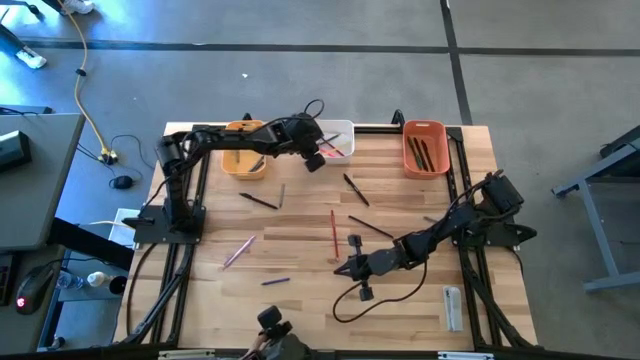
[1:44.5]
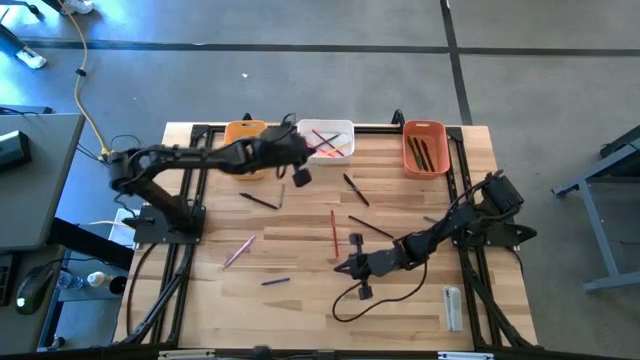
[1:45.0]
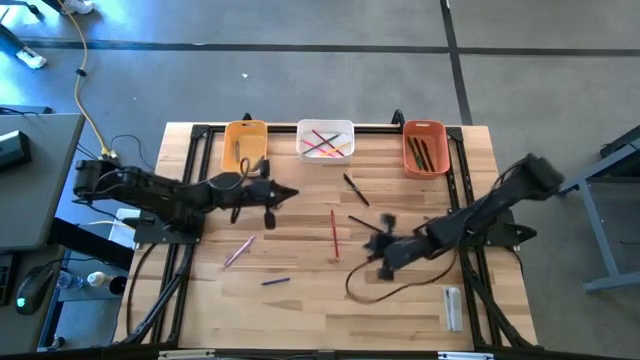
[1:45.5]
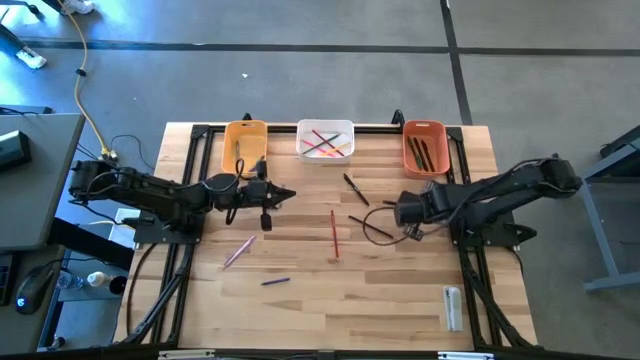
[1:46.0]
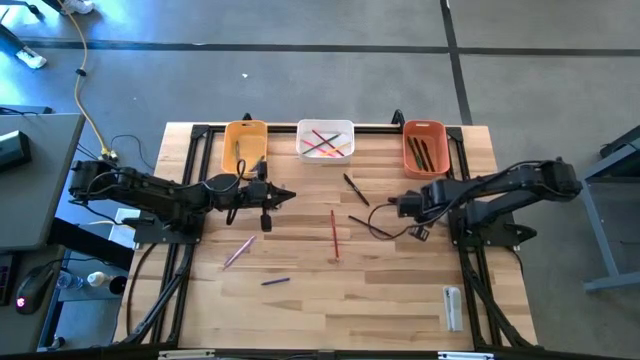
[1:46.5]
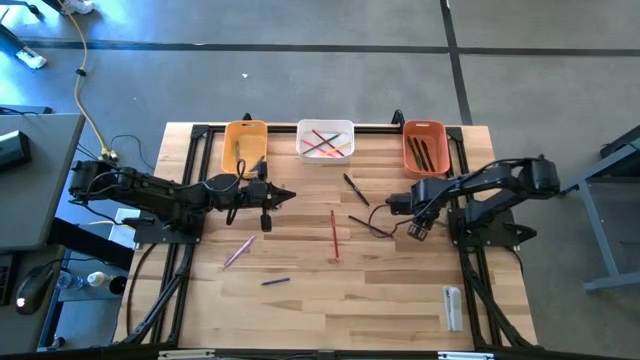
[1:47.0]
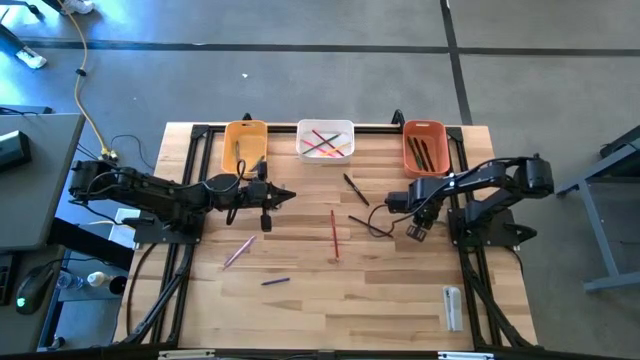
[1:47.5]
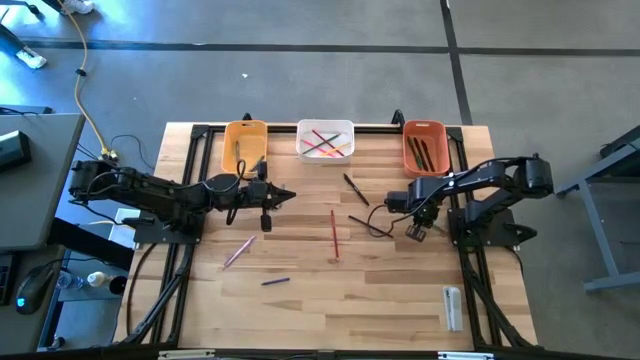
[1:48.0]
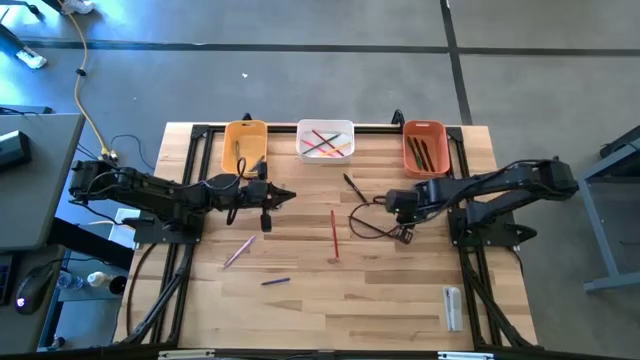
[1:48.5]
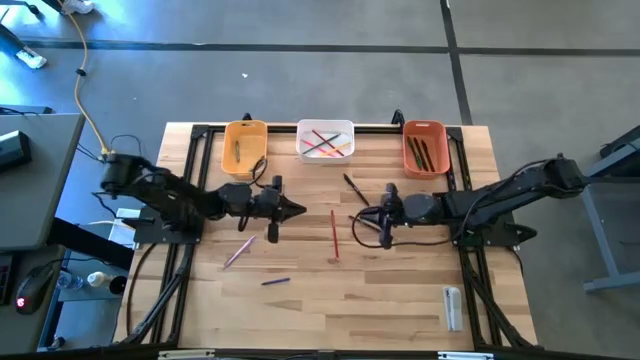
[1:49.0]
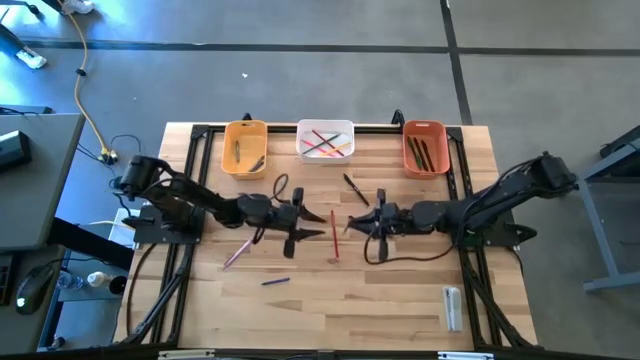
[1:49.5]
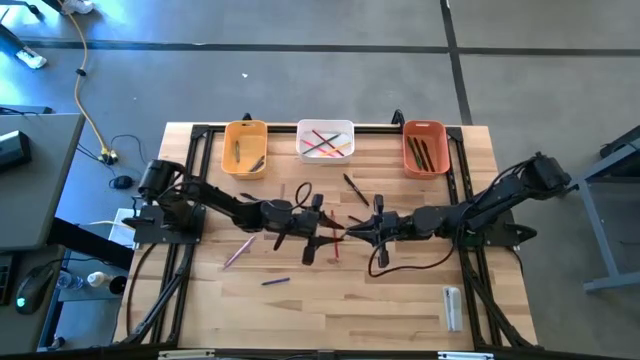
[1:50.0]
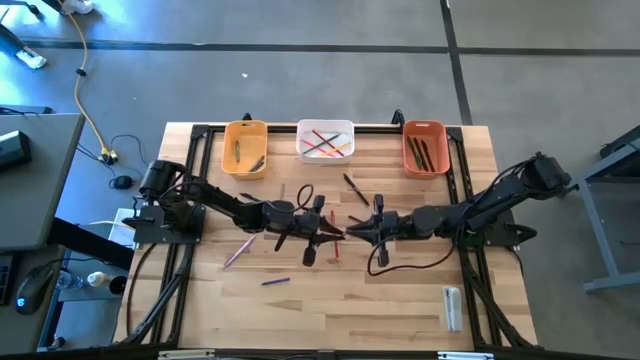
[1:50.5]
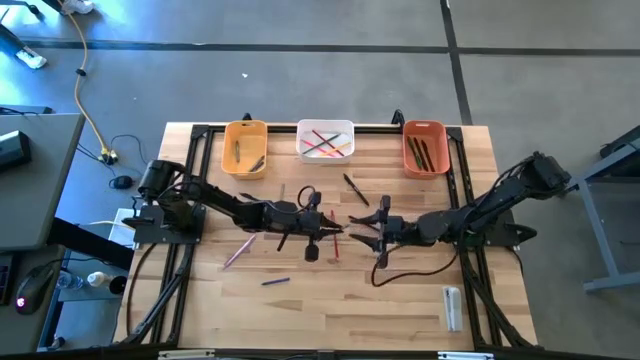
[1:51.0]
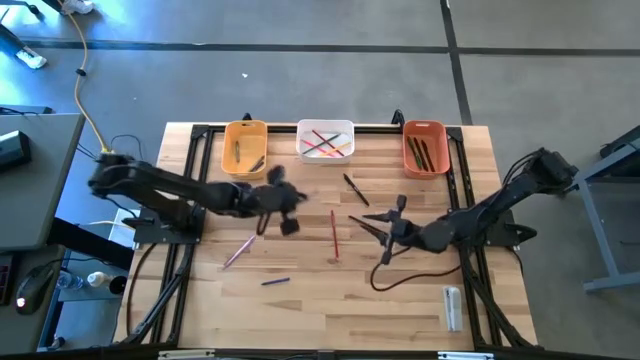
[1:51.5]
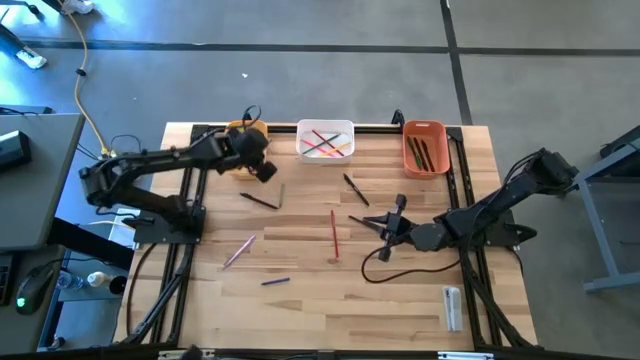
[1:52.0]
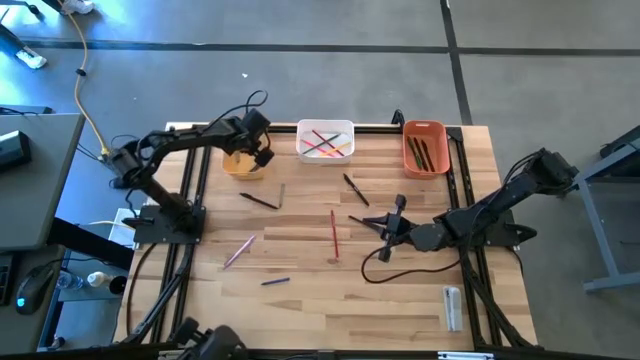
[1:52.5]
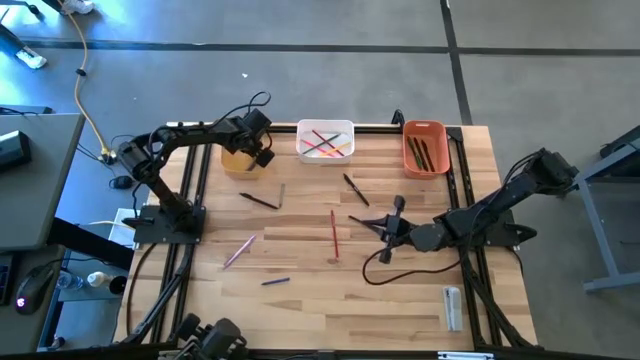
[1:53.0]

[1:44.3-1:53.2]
Task: Sort crayons/erasers/pens/pencils in bins
Put the gray crayon into the yellow bin

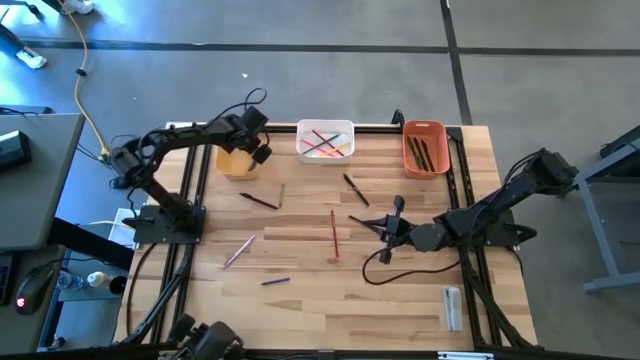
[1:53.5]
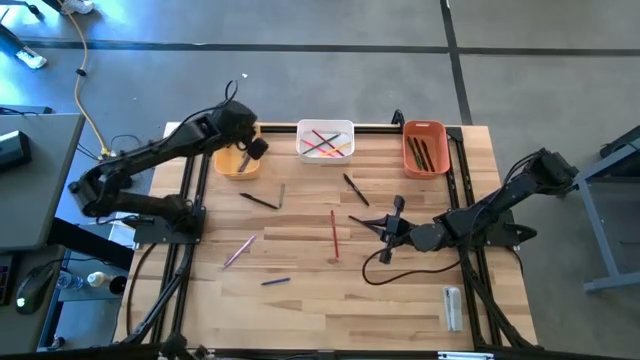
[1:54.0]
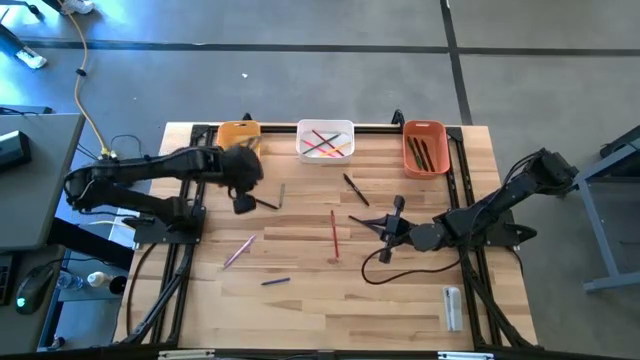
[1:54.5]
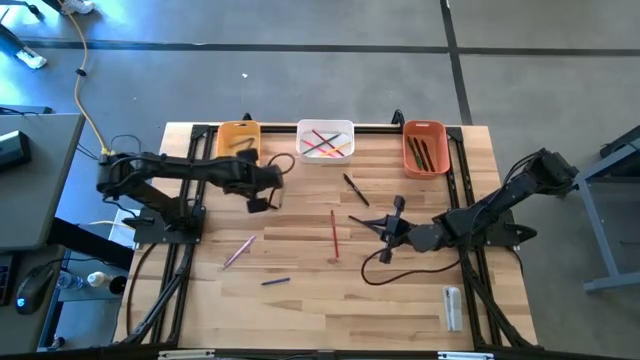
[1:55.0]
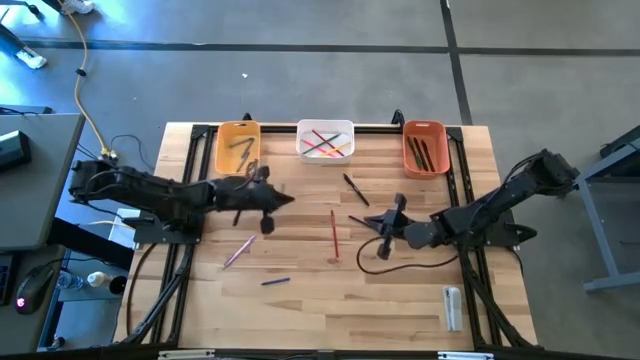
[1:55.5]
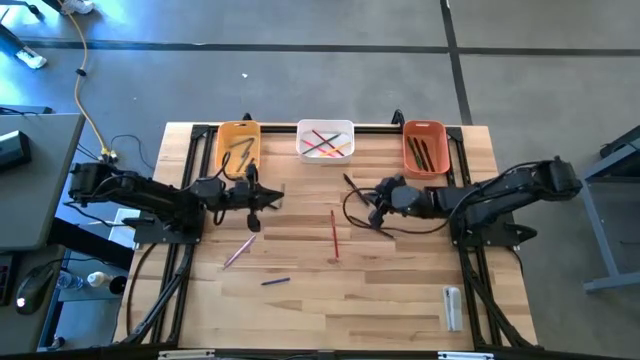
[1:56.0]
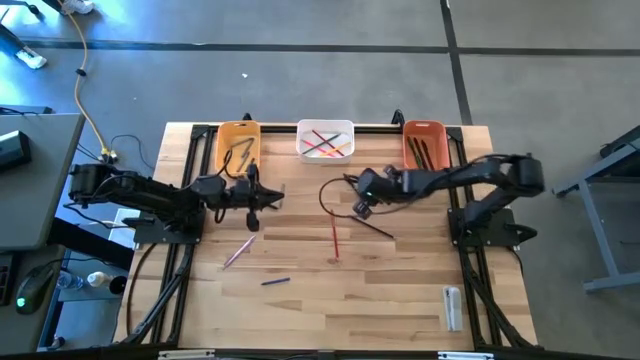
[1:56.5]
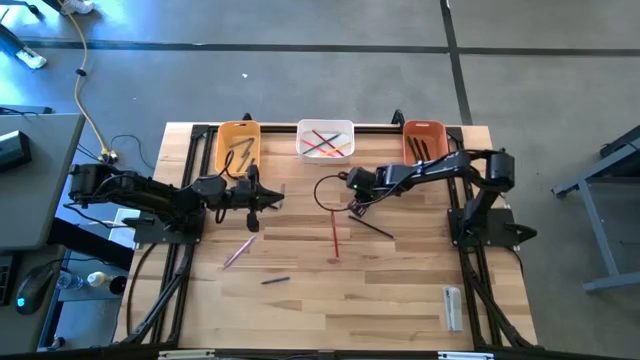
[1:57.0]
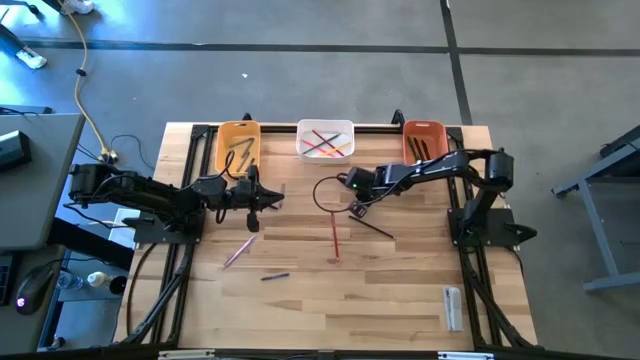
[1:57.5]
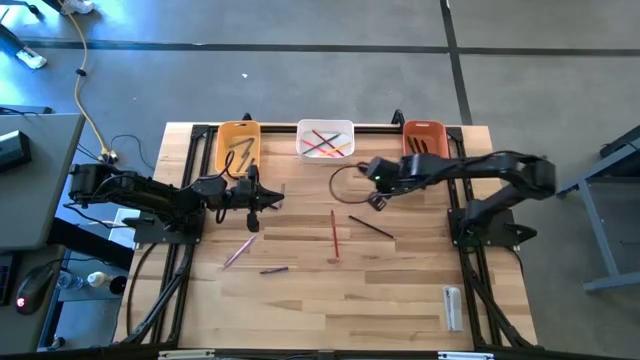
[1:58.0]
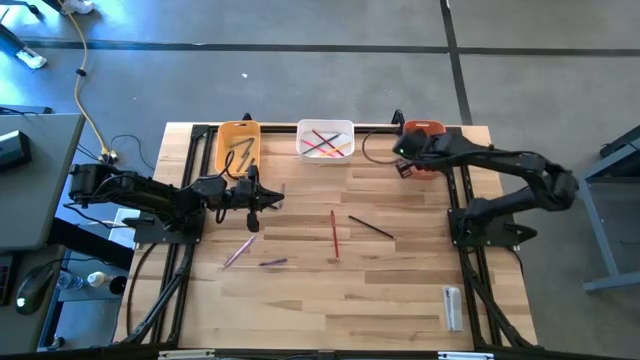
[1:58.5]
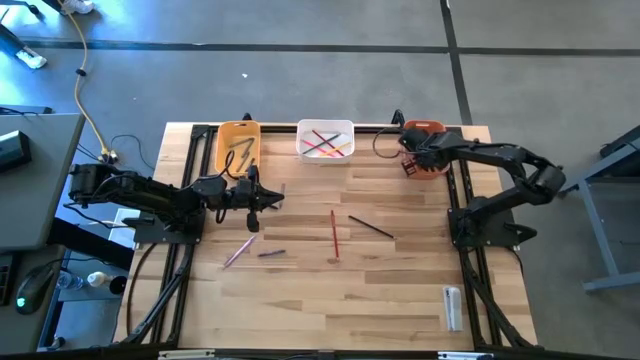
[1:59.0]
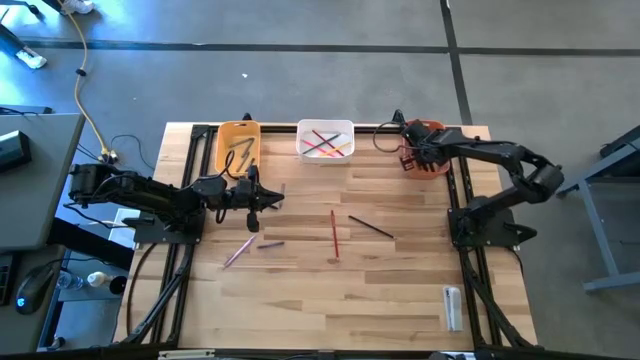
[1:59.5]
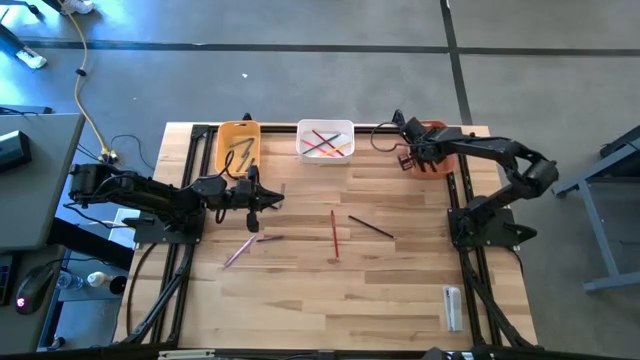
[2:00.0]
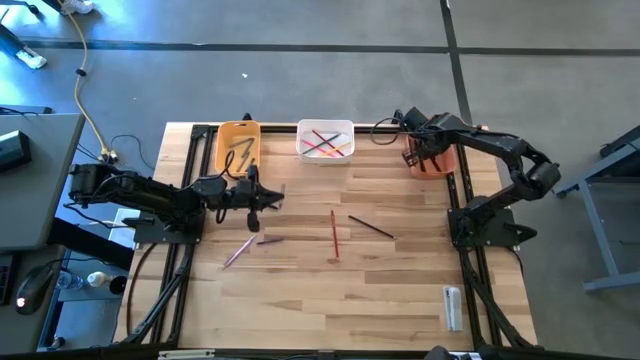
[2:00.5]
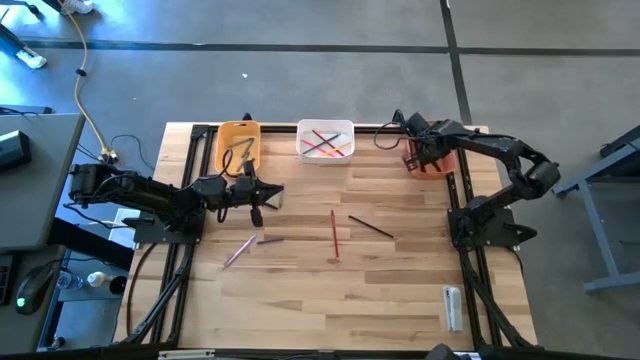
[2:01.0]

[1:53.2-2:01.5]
Put the black pen into the orange bin

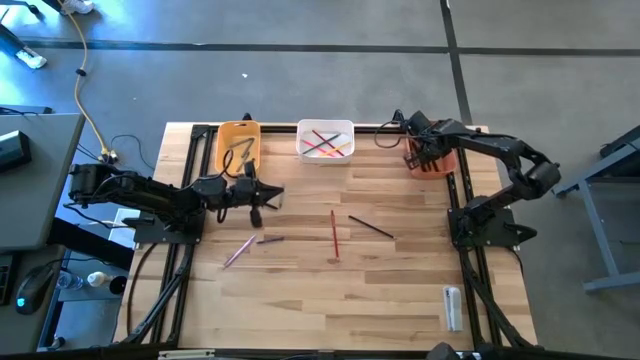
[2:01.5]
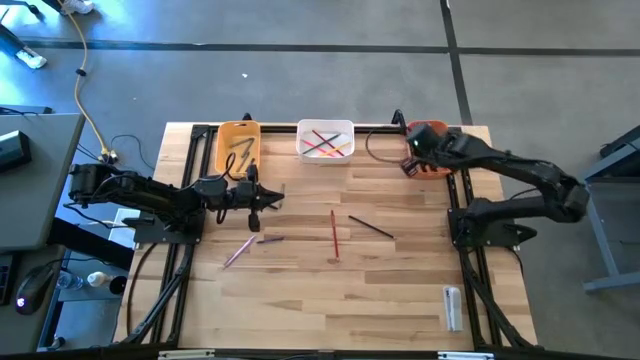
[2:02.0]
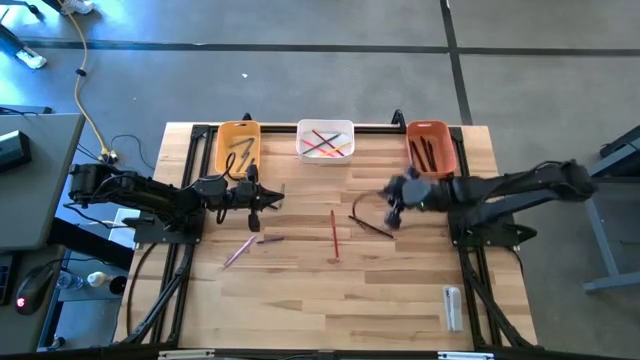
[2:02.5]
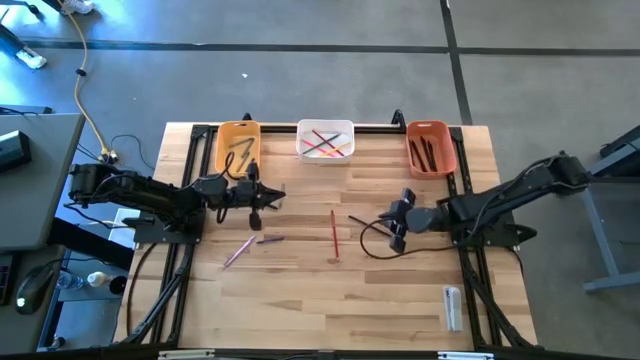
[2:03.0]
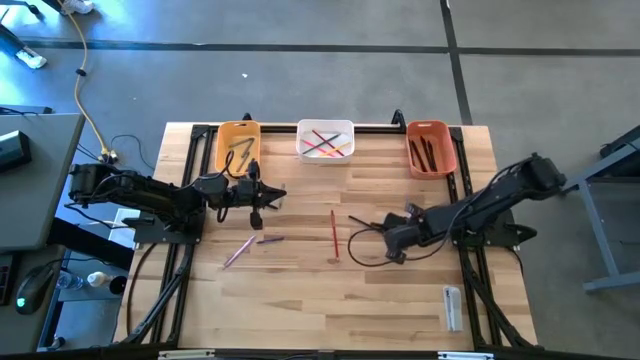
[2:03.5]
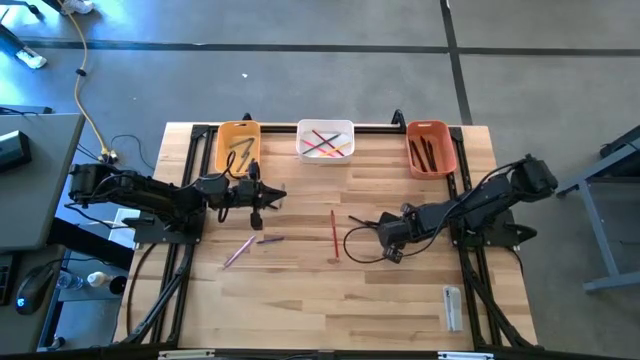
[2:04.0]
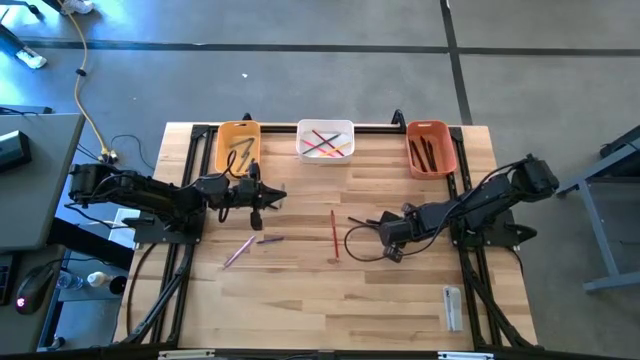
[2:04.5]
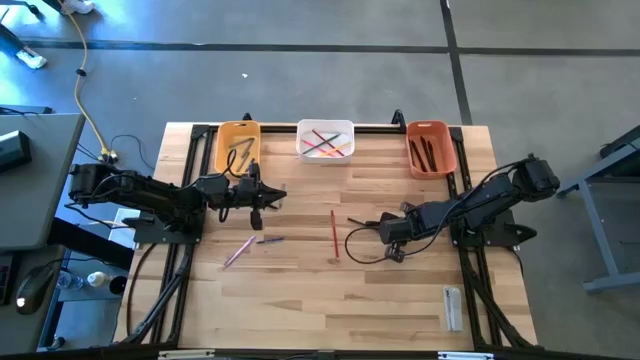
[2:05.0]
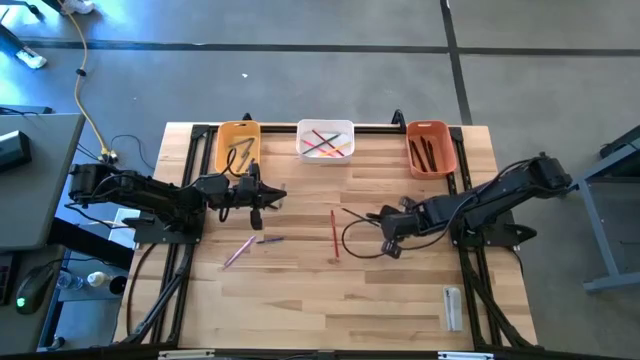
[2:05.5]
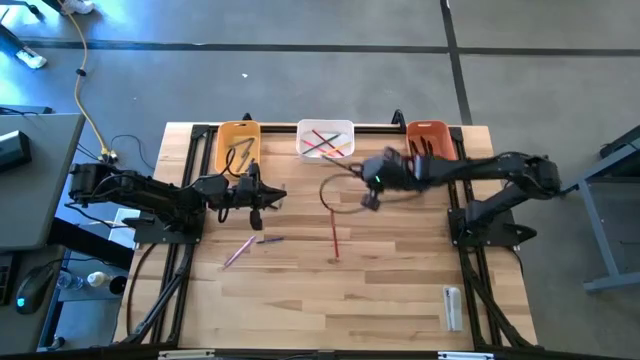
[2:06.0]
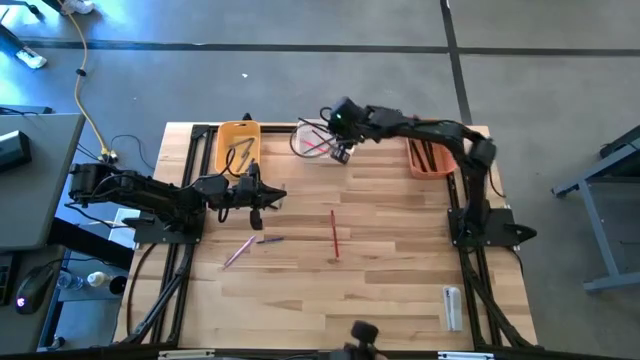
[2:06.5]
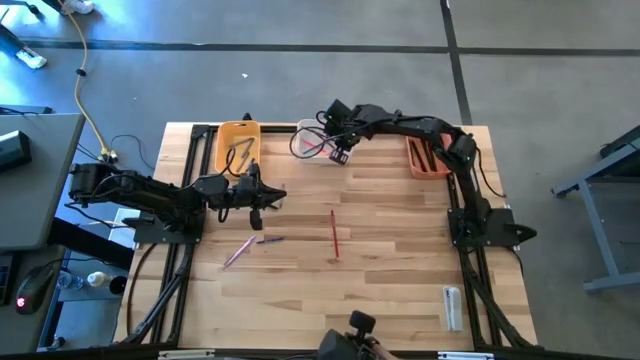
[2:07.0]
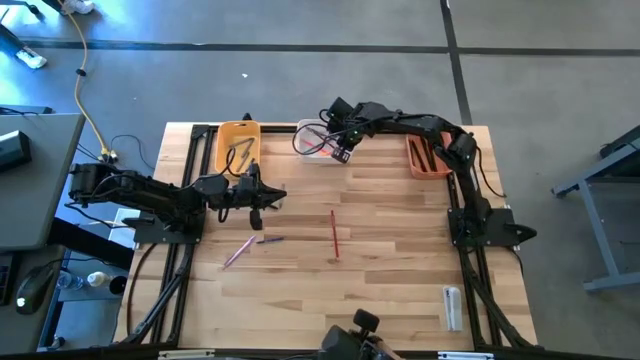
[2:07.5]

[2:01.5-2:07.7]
Put the blue color pencil into the white bin
